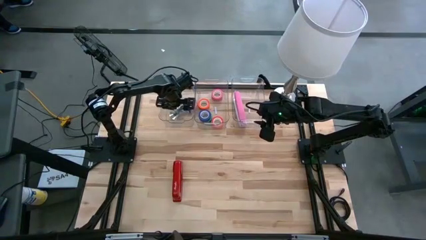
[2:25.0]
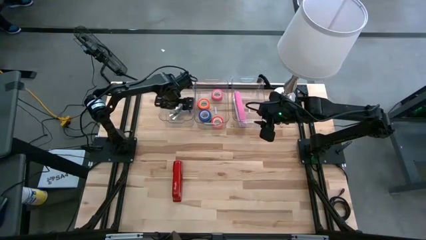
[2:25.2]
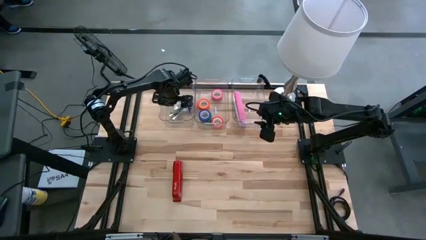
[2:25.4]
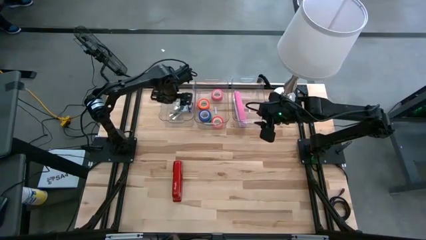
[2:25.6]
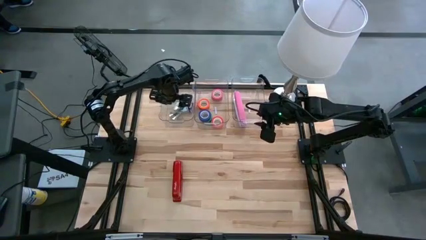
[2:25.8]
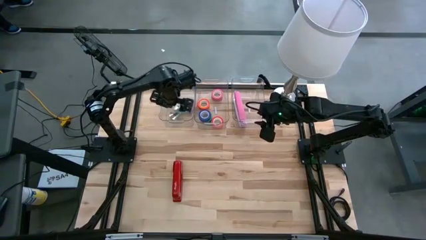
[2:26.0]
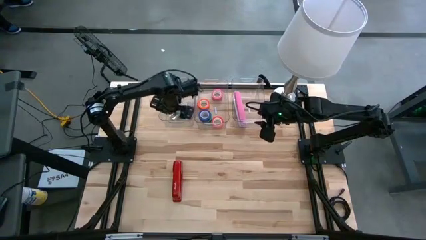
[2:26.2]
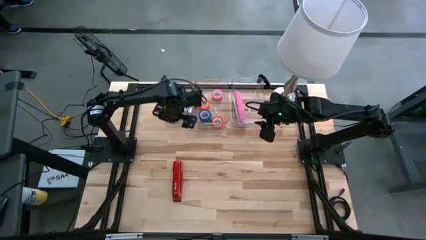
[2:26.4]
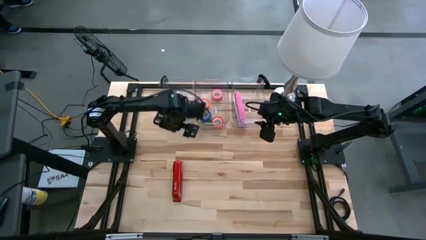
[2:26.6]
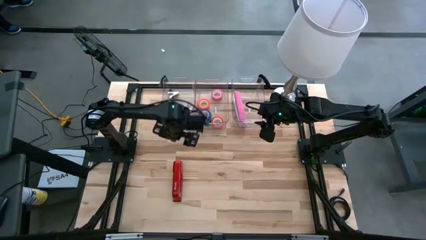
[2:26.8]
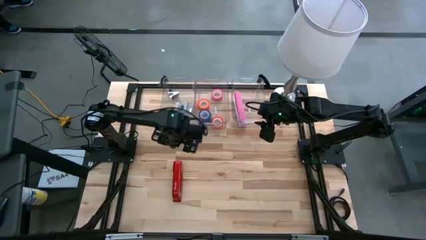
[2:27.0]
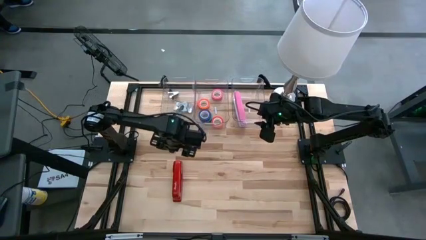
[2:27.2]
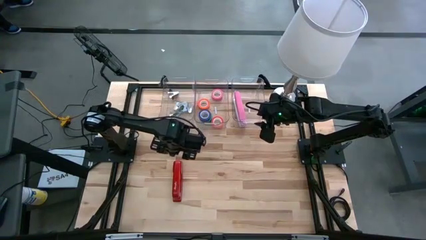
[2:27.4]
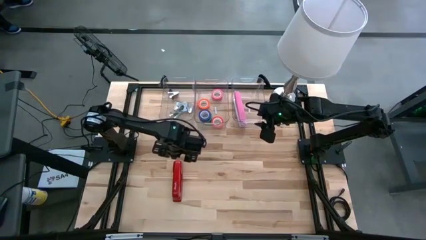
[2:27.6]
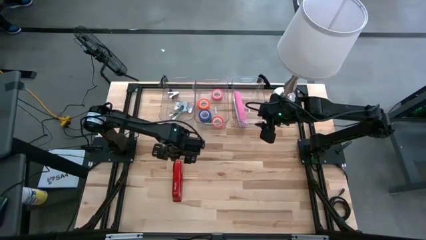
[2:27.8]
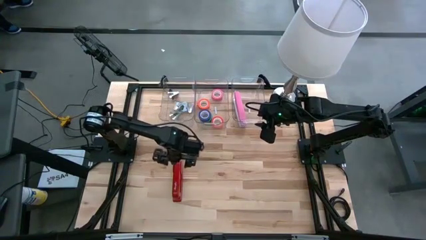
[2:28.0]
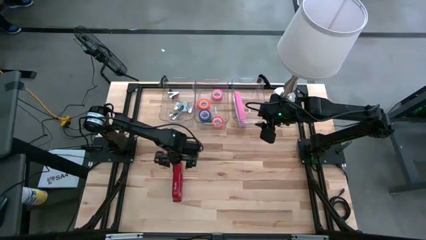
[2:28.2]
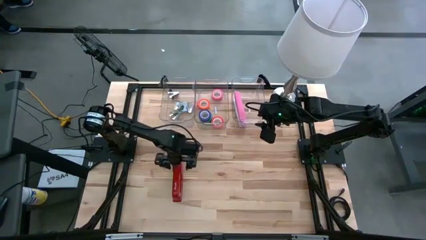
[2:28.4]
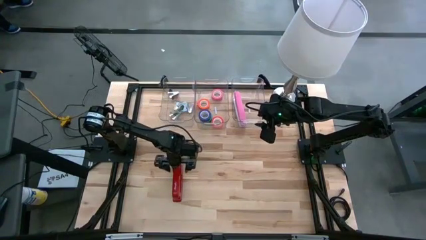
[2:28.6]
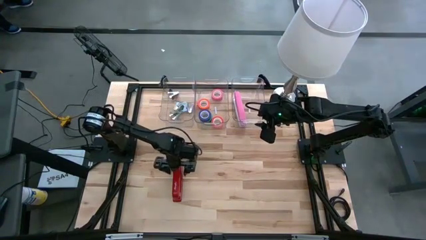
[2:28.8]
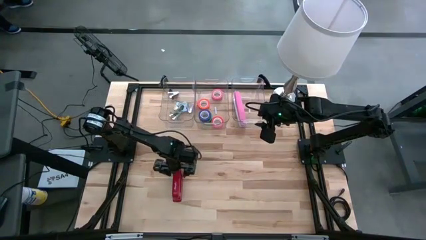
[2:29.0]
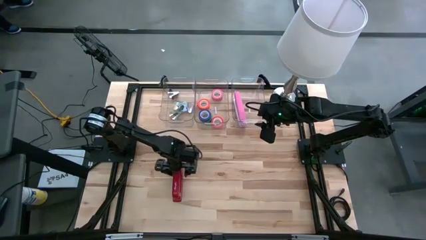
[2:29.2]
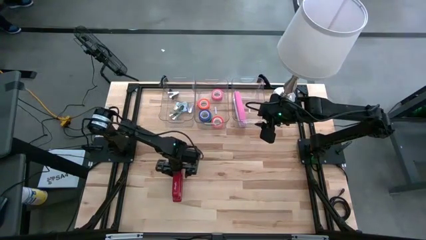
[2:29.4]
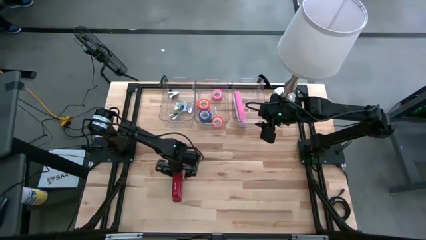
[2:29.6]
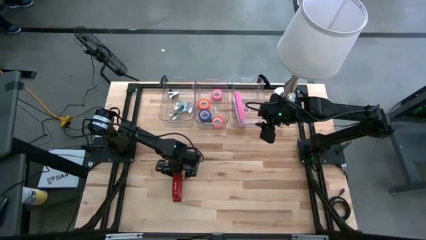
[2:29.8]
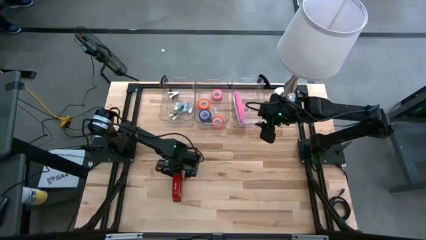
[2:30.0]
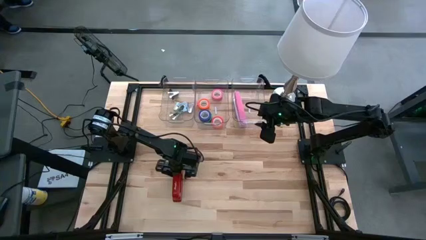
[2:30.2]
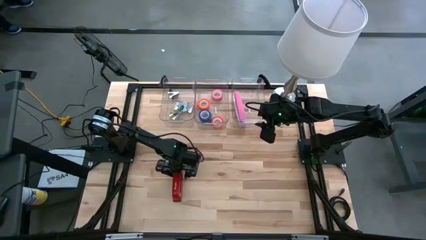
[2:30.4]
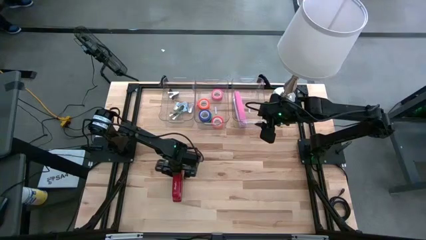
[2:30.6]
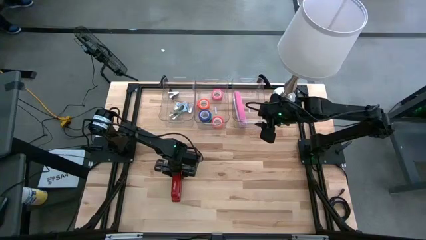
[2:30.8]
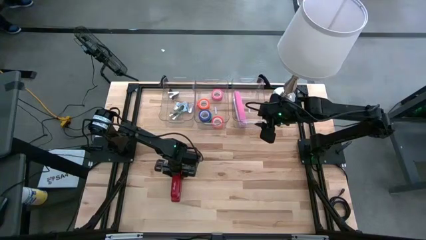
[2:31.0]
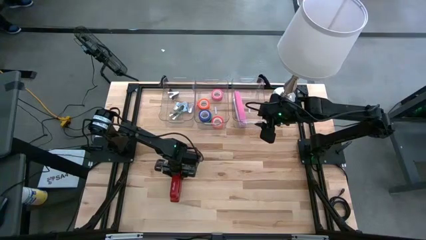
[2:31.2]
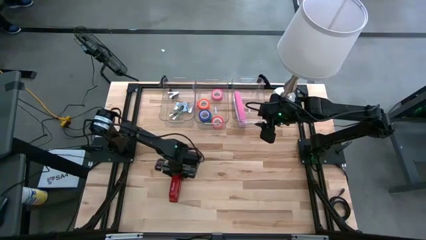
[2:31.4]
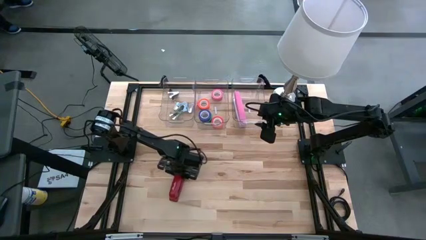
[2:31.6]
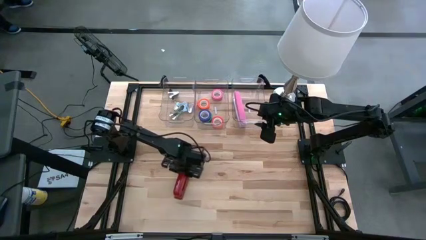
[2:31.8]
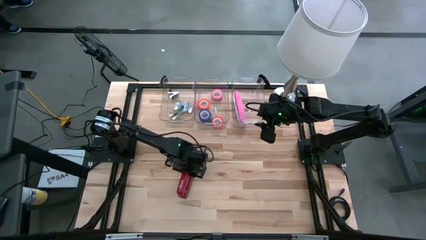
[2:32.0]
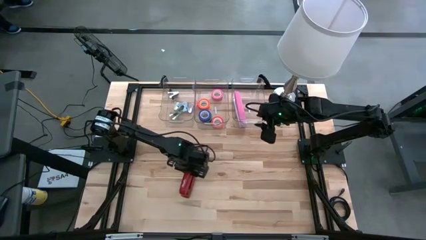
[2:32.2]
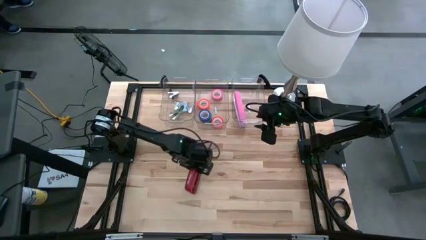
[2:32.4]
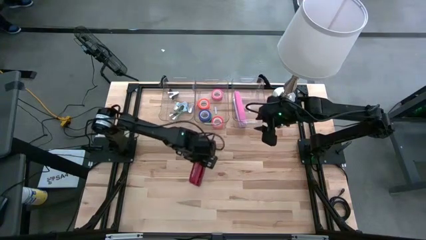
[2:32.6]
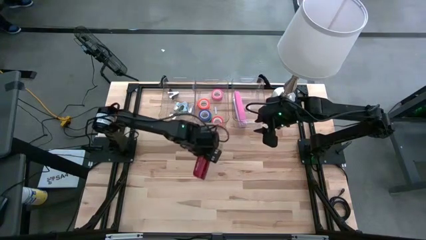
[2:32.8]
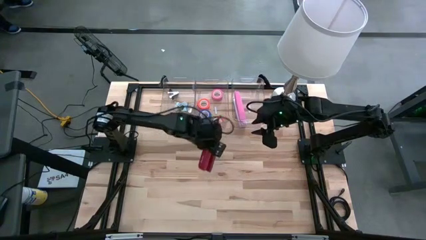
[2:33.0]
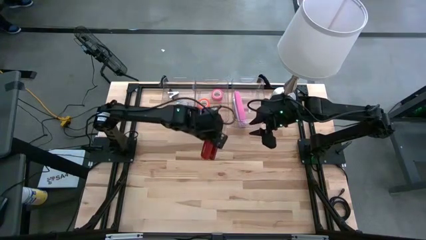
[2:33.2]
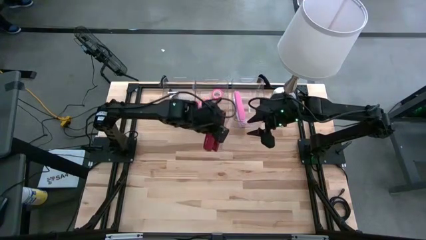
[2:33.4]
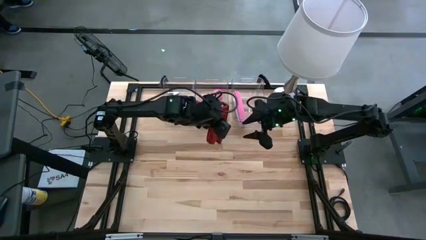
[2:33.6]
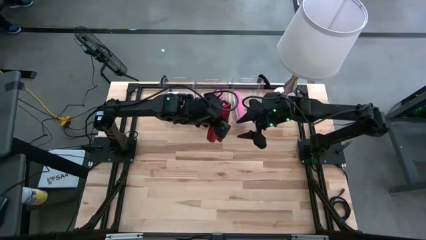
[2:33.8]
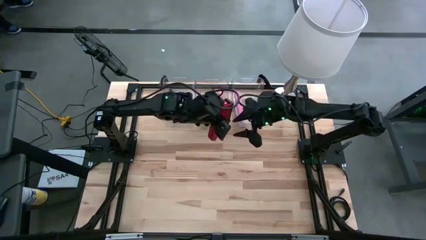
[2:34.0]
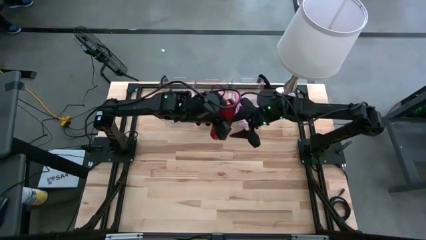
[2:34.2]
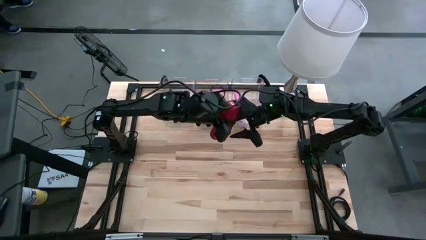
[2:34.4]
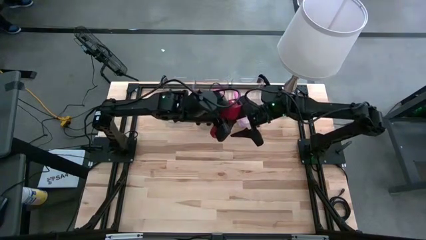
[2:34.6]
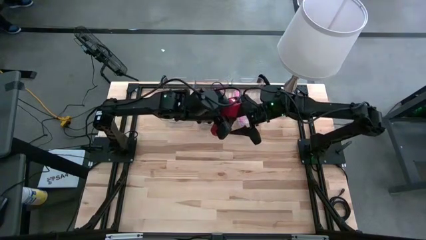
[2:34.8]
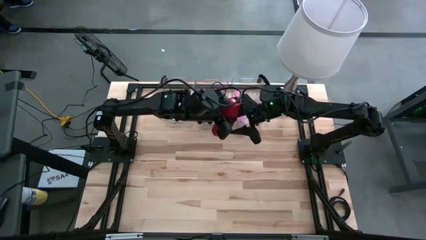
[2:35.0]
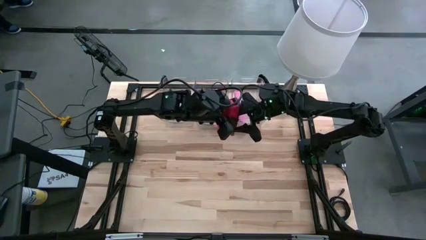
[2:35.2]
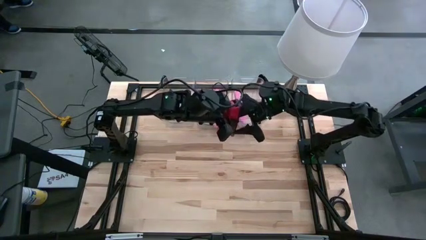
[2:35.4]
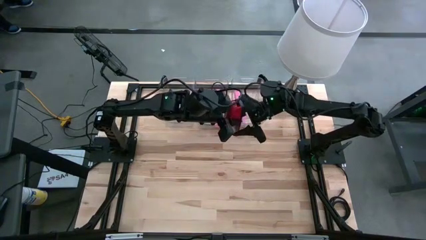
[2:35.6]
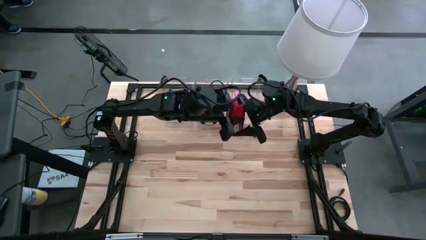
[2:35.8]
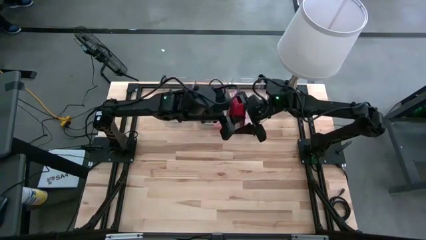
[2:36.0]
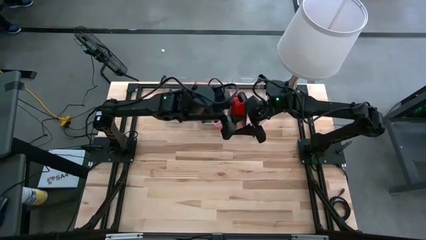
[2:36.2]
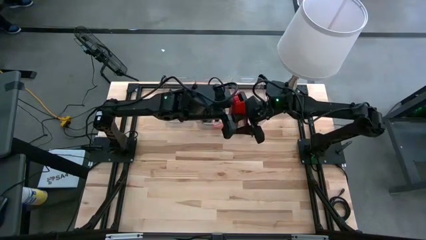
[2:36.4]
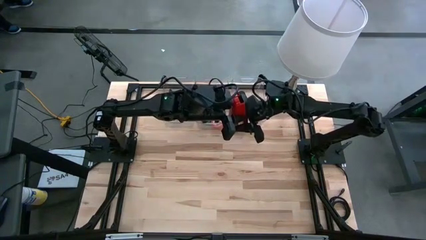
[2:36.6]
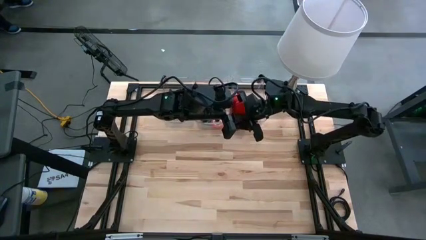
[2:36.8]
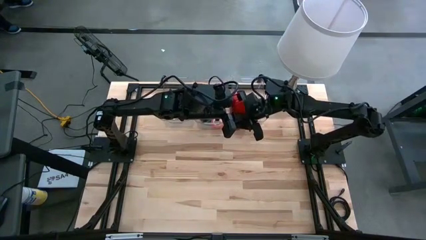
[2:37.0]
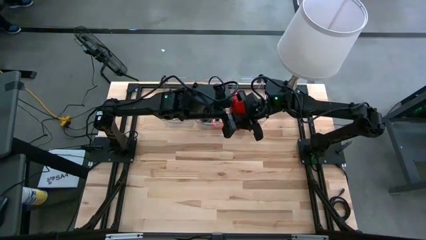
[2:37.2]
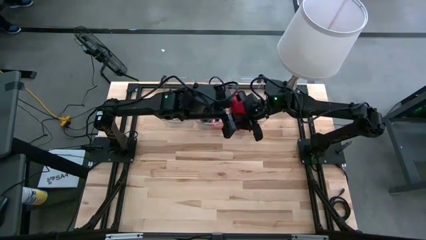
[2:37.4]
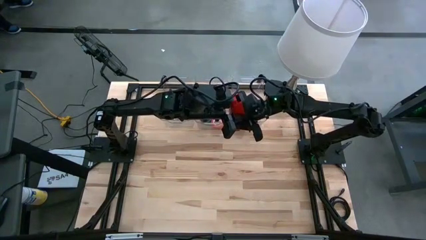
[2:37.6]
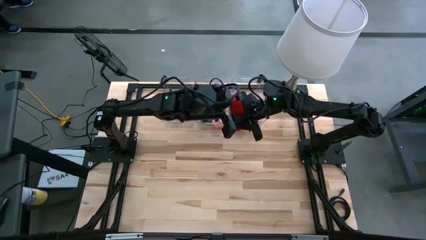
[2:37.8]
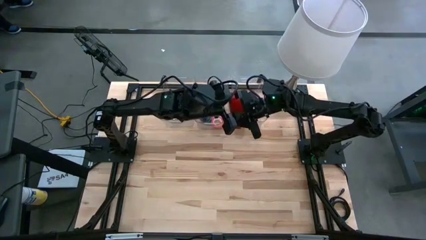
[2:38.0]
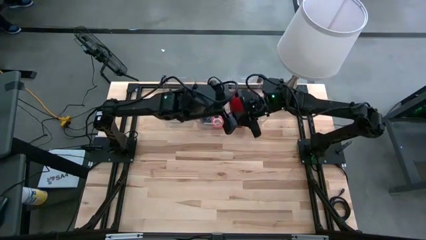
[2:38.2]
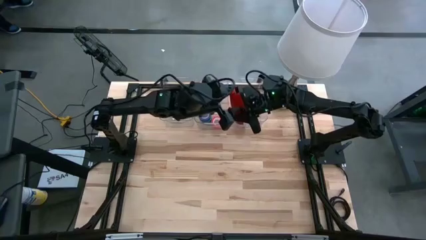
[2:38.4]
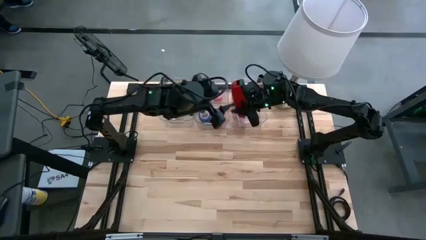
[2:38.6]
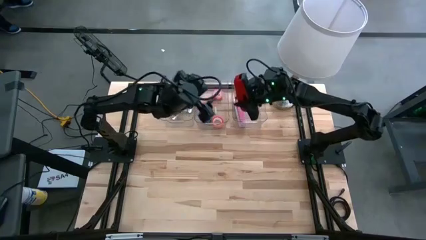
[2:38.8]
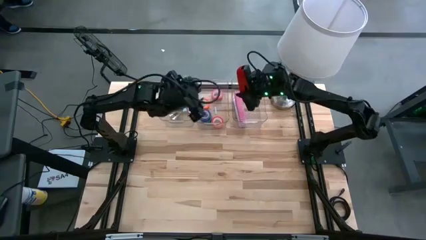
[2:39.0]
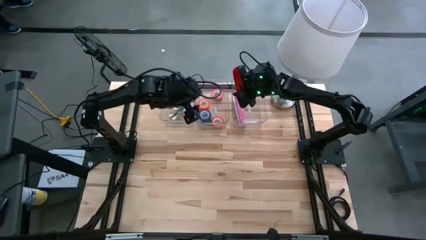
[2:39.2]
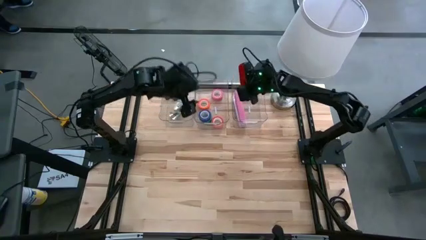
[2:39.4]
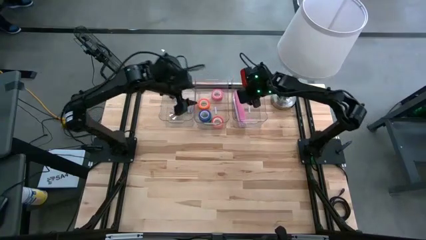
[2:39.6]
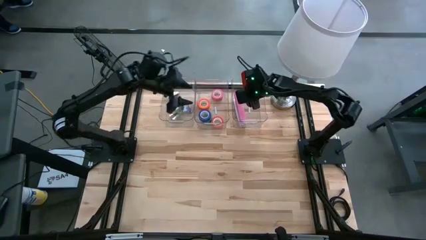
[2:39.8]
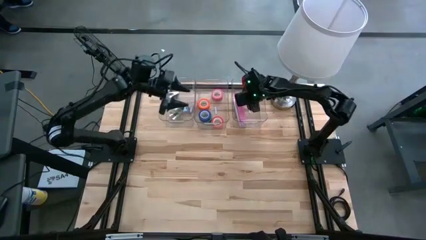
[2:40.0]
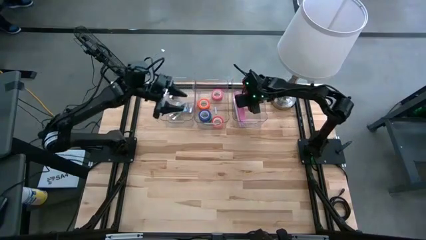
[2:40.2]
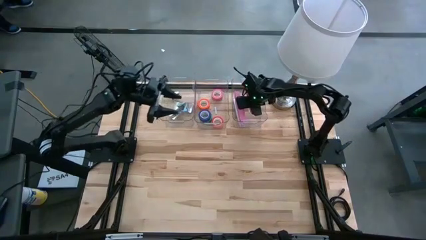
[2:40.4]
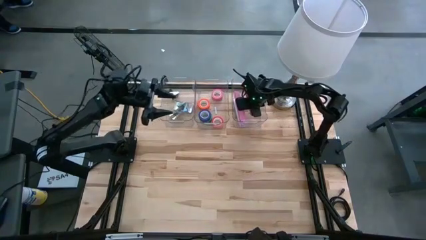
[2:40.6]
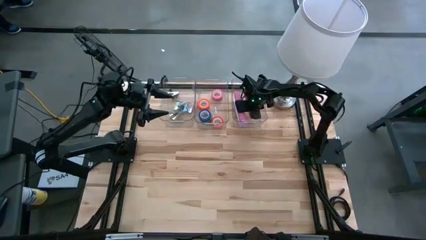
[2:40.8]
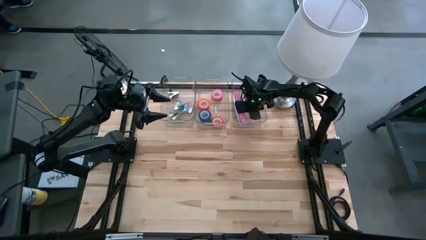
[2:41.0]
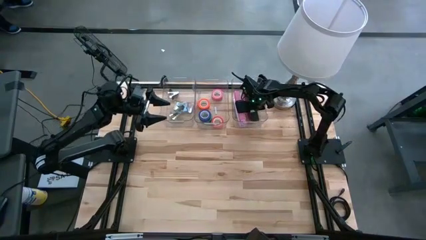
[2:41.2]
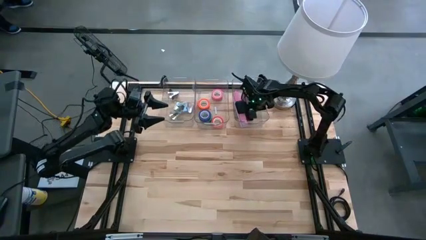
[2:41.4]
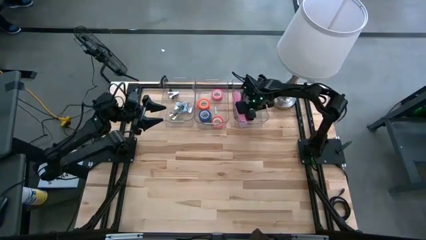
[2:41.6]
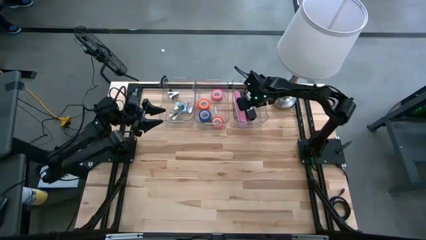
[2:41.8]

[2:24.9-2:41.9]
Task: Pick and place Stapler, Stapler remover, tape
Put the red stapler into the right transparent bin
